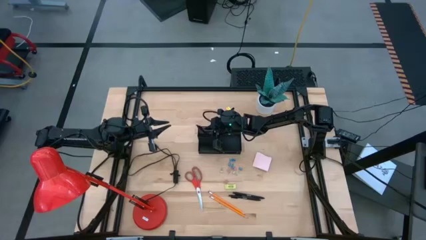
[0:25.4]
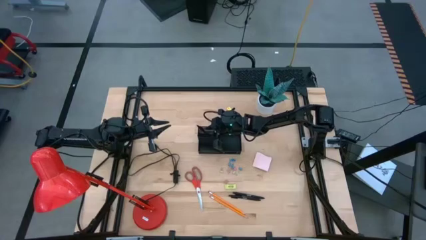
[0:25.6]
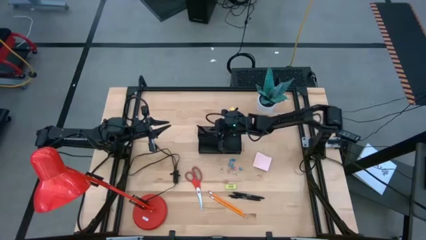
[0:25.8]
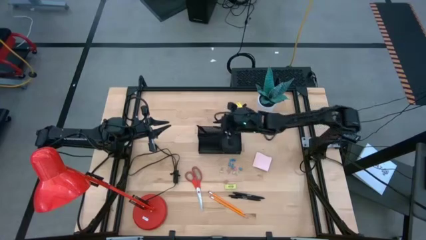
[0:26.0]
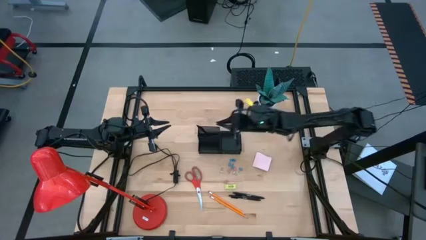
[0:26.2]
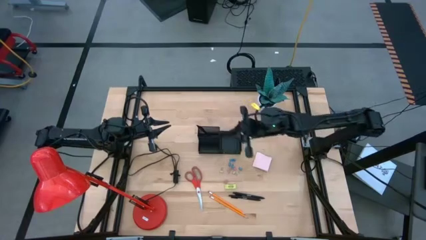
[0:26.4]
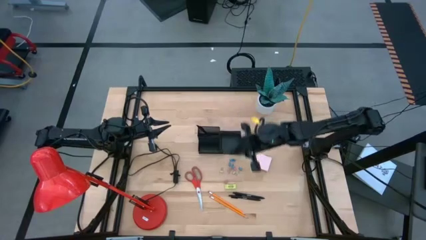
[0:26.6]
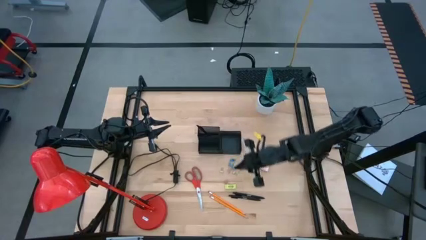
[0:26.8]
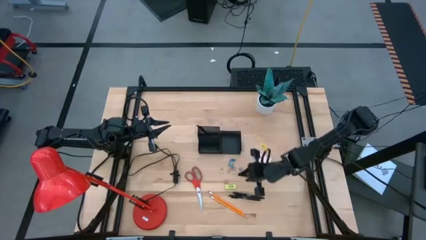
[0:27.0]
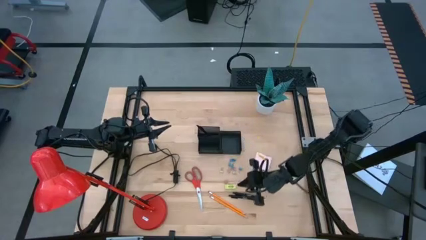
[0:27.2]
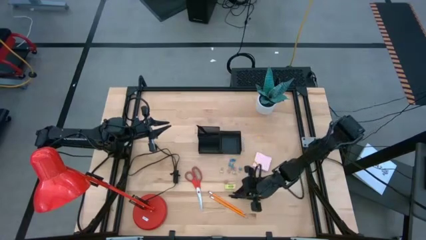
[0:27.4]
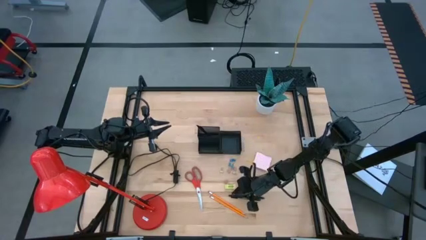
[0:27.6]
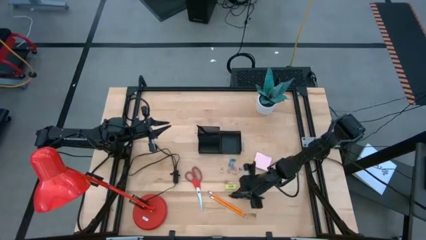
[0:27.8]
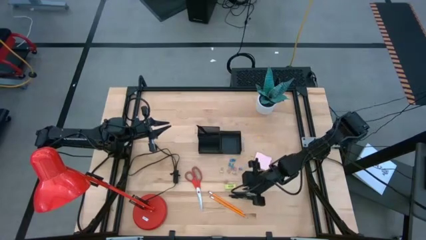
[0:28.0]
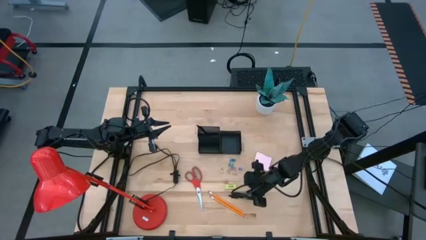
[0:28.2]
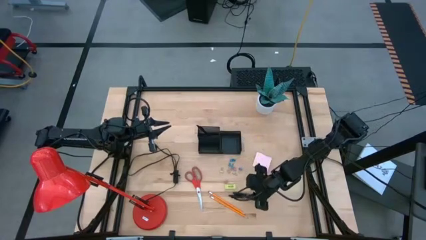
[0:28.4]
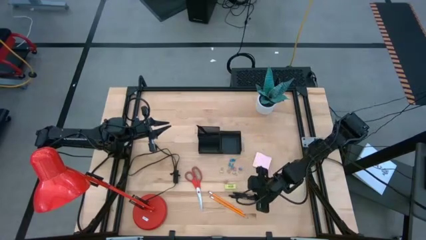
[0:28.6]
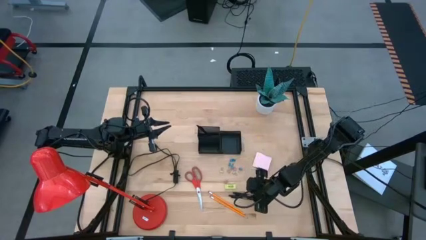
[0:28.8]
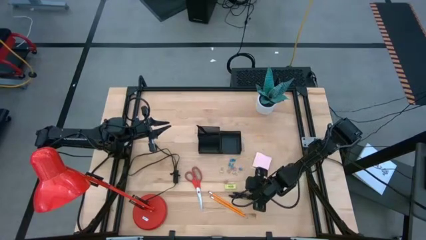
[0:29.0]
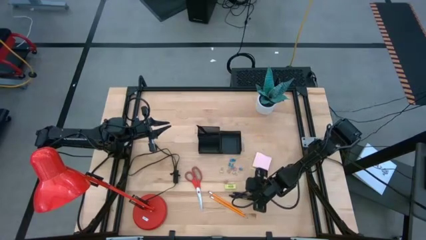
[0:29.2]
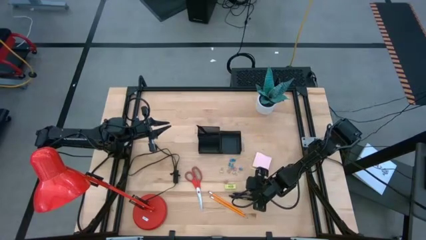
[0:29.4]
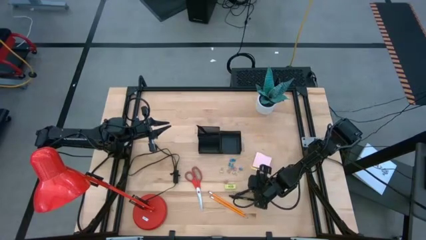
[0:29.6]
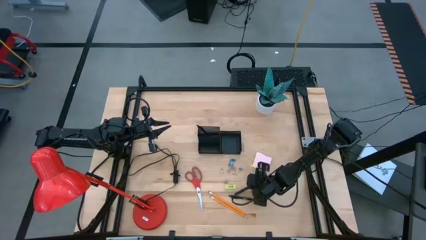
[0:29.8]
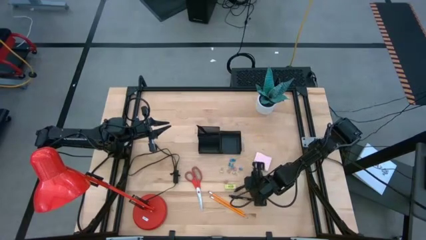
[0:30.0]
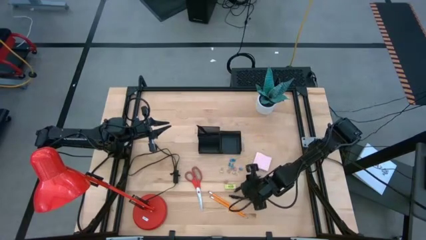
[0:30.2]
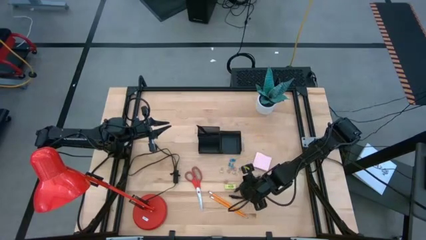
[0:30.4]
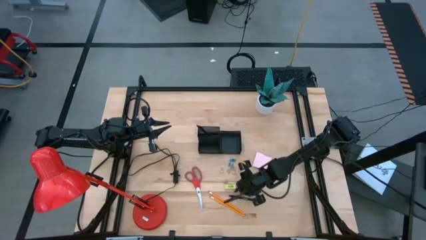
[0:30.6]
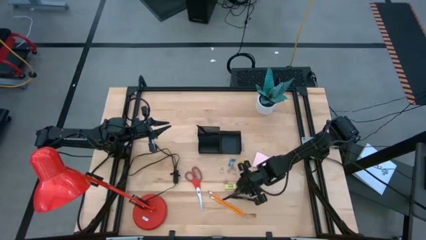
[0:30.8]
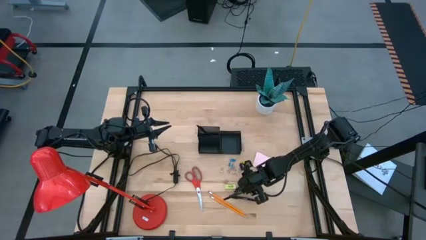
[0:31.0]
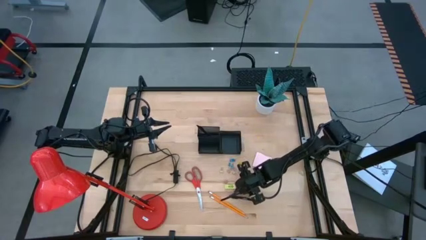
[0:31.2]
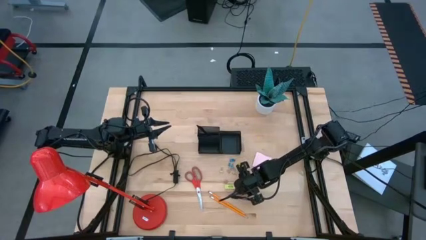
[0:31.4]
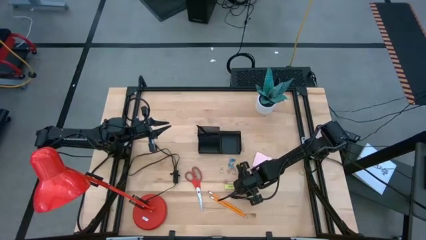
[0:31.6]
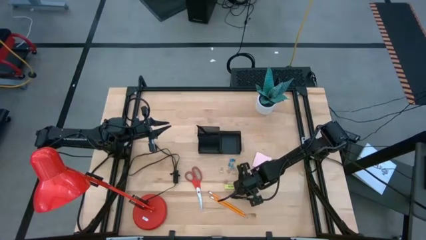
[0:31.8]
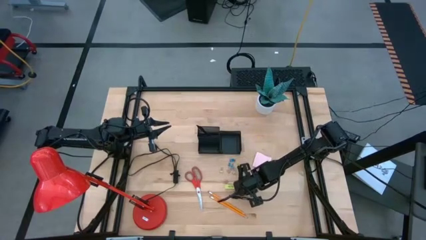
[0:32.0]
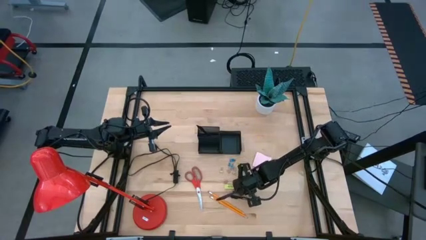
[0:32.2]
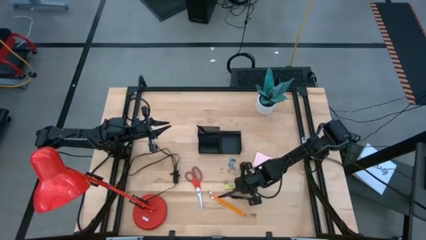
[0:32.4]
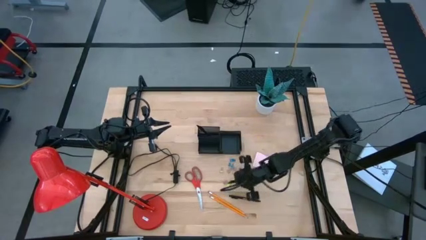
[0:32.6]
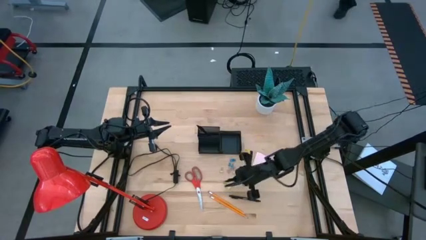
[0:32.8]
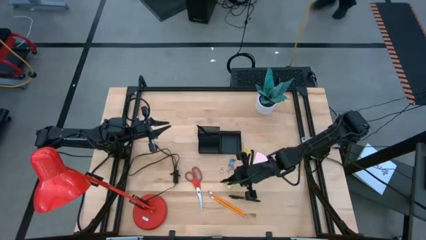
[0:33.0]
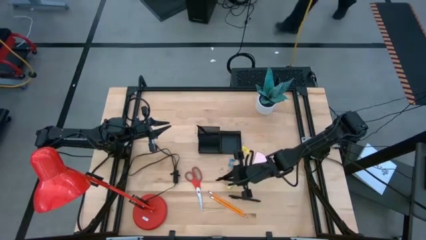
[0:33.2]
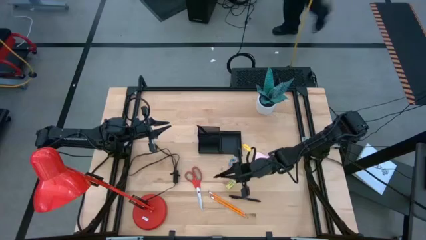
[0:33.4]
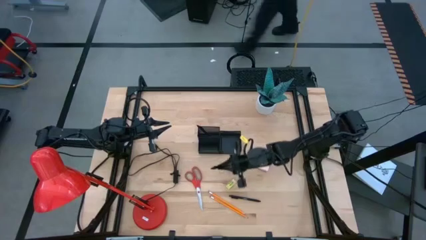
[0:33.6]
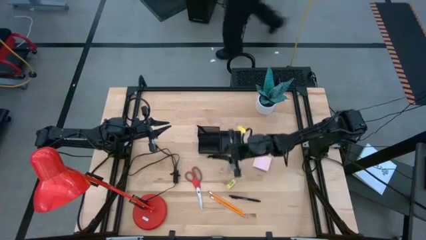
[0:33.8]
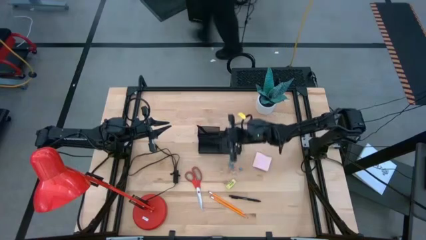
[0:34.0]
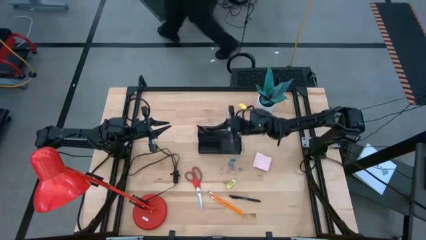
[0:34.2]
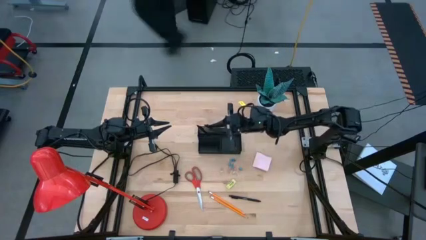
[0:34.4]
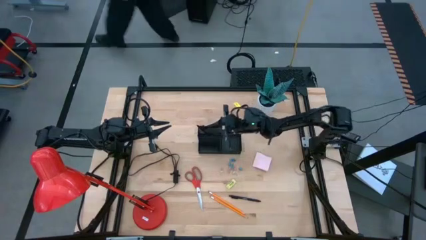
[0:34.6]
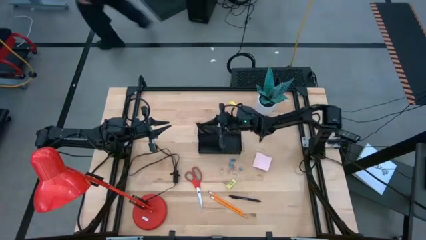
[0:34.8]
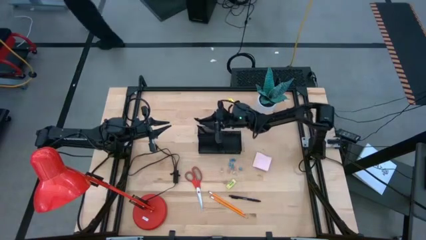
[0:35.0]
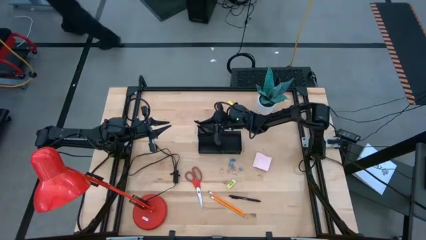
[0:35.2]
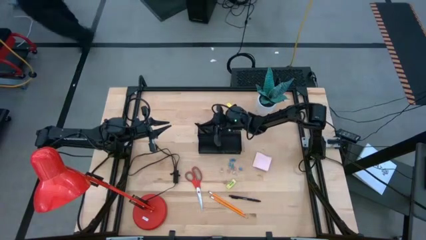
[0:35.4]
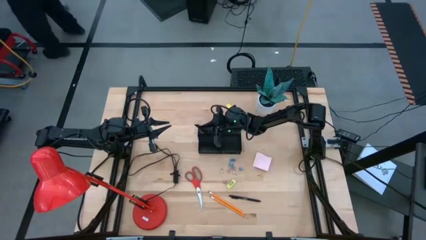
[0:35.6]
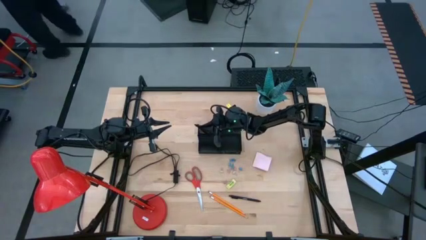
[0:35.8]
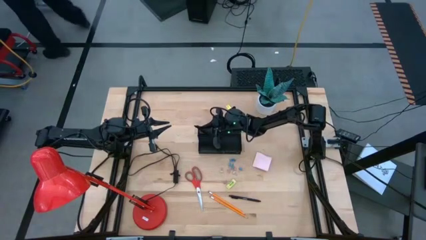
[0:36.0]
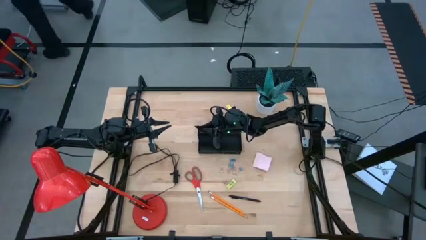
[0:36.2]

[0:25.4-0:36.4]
Task: Pick and place office supplies into organizer
Put the black pen into the black desk organizer

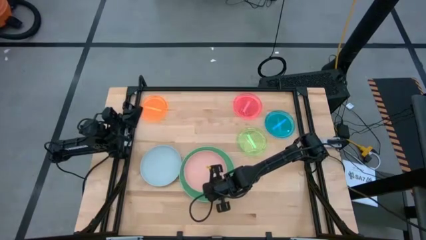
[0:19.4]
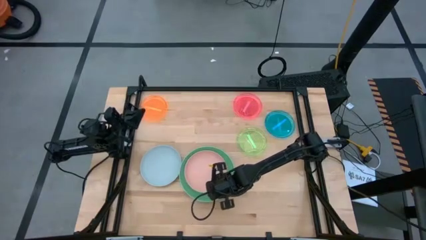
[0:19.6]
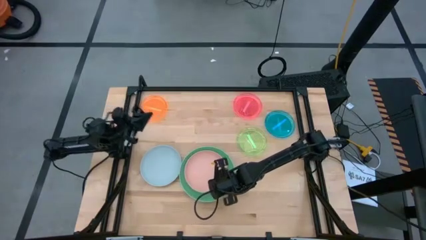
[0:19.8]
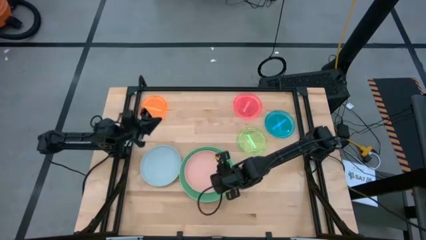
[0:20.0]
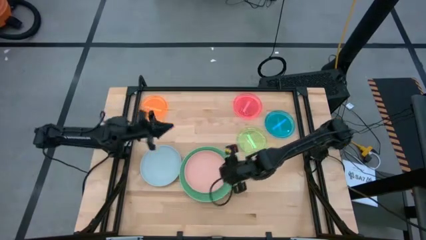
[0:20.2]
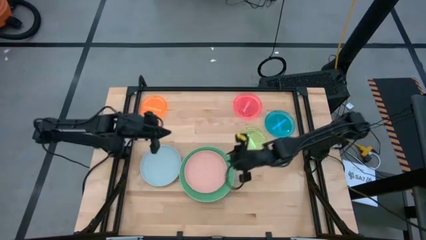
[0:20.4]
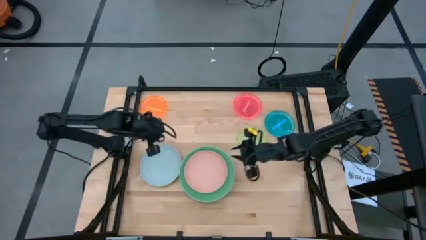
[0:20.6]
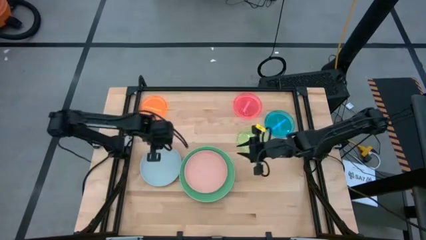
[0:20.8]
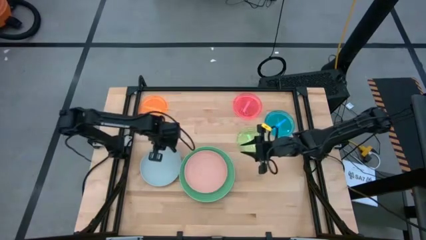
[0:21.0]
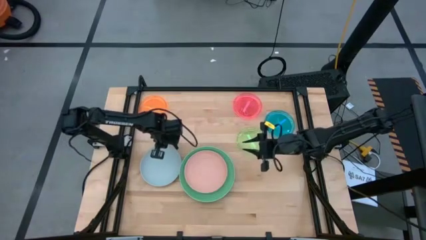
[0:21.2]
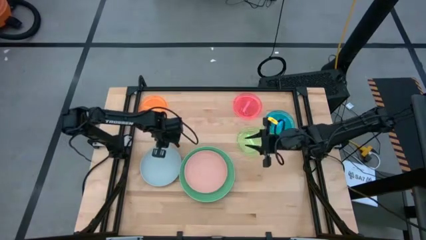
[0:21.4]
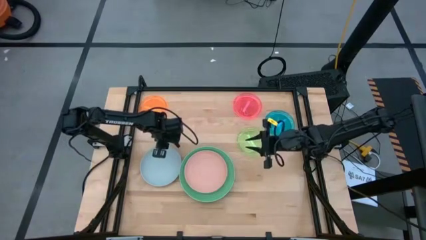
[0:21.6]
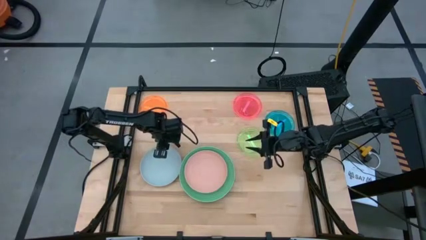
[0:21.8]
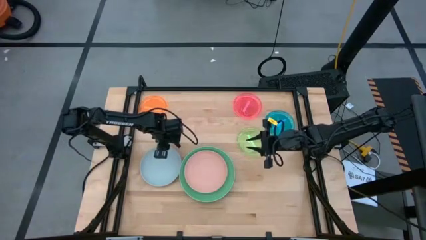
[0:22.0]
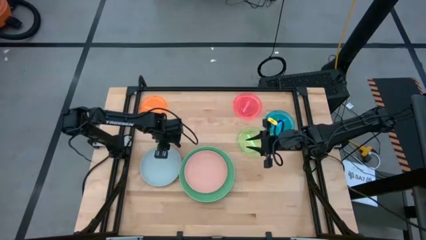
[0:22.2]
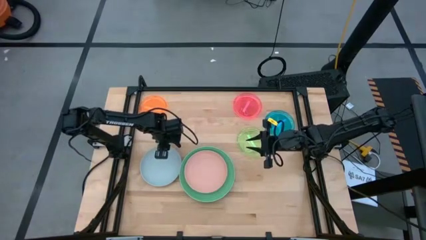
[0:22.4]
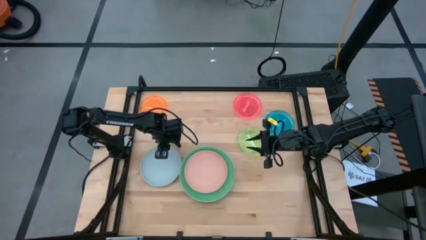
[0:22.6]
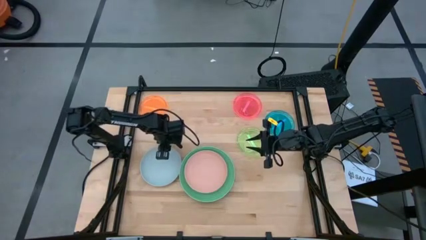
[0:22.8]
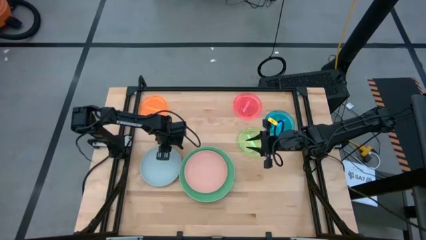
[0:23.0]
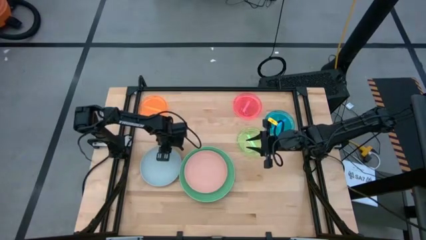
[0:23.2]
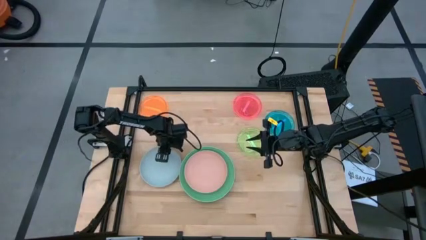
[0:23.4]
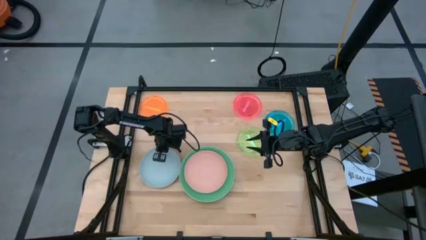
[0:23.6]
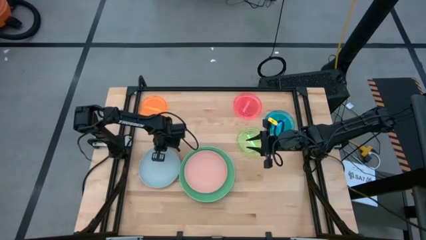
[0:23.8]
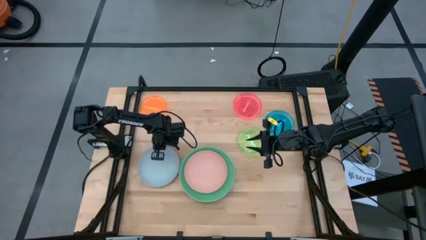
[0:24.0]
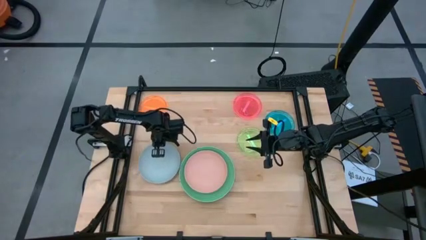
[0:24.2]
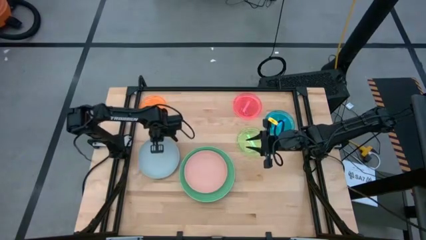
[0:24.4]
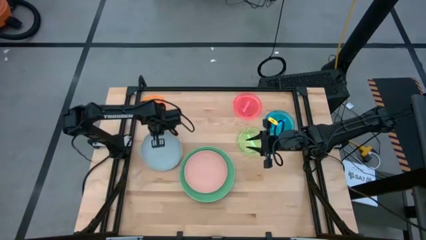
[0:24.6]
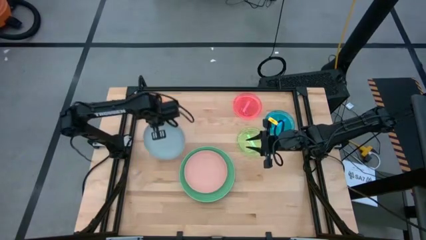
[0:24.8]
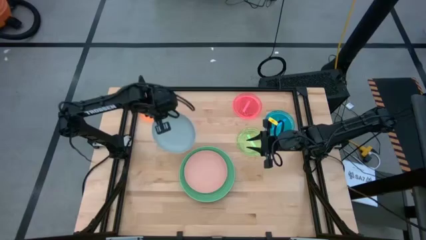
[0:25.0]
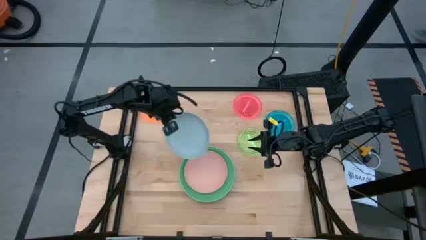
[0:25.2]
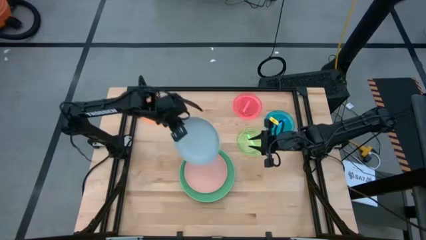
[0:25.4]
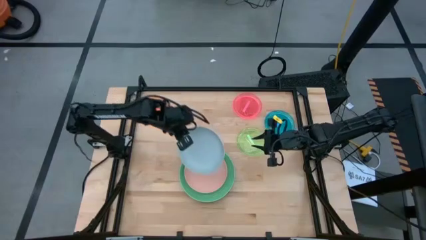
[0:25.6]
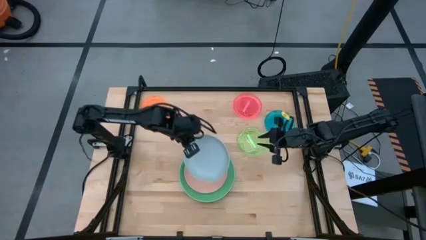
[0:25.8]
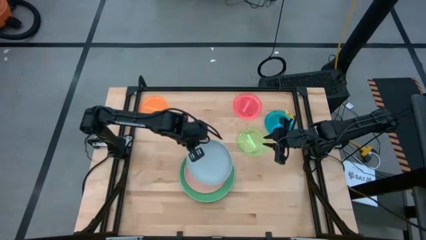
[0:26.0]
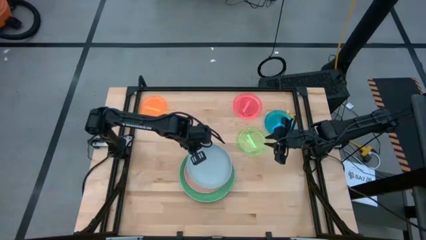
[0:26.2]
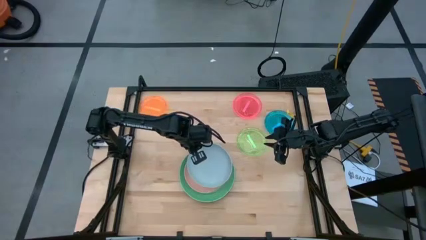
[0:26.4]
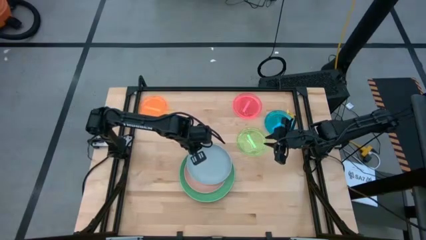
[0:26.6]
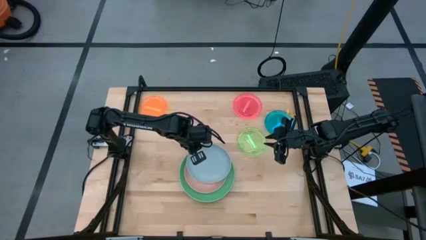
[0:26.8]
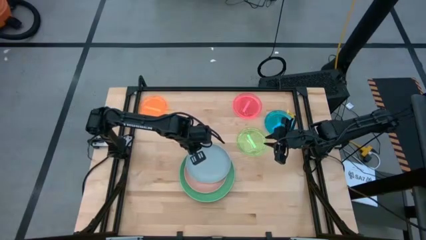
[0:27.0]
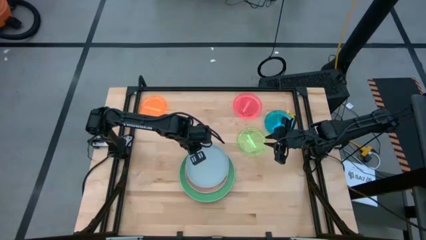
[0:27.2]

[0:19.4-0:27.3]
Task: Stack plastic plates
Stack the large light blue plate on the large pink plate
